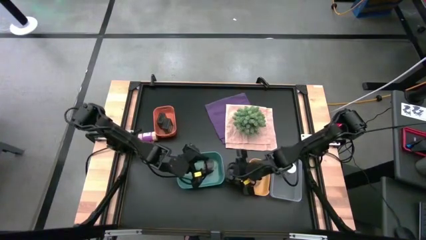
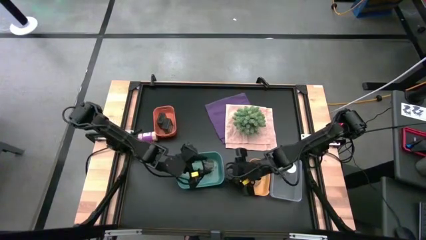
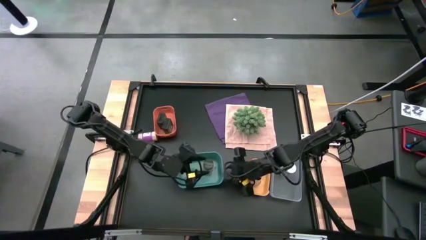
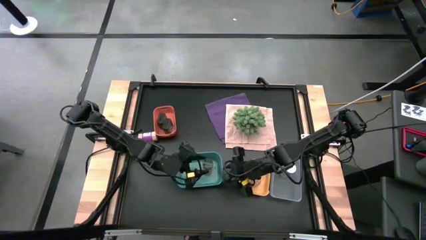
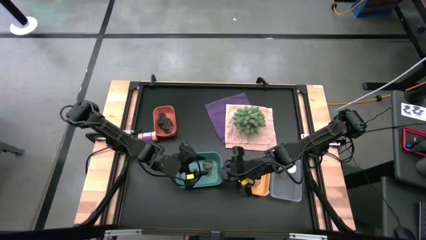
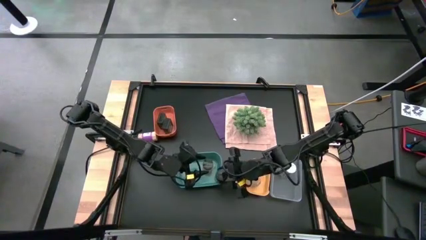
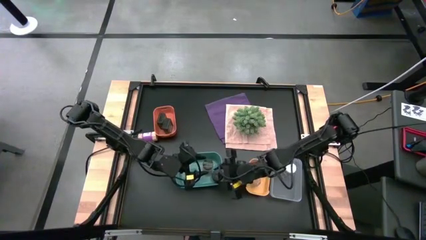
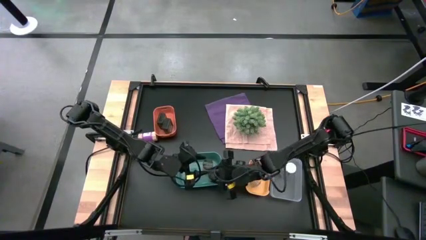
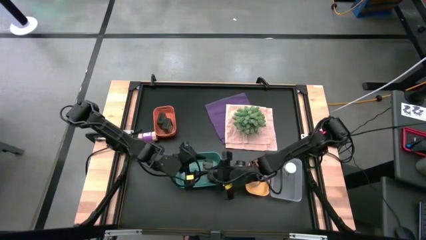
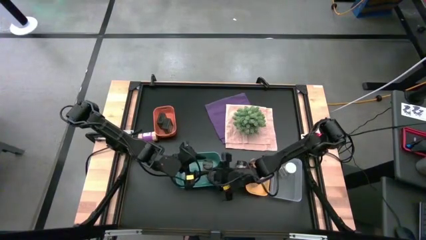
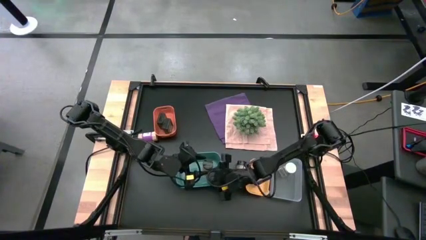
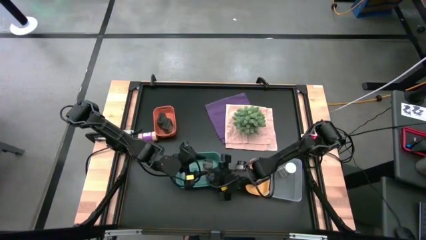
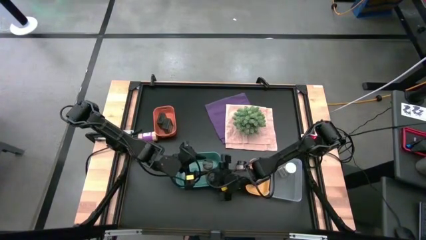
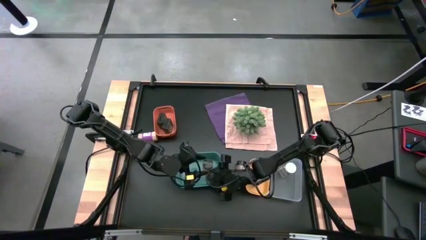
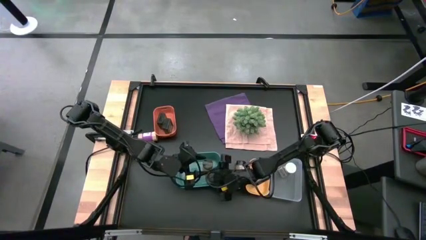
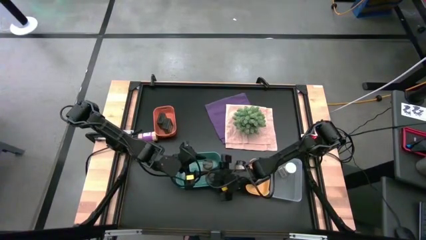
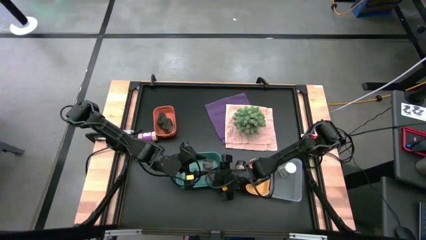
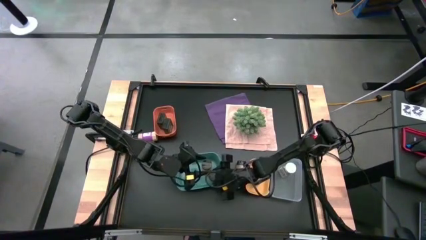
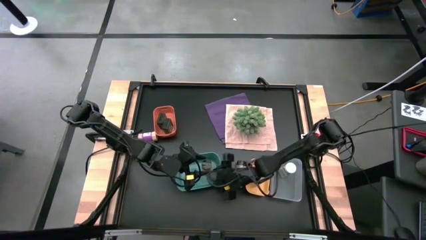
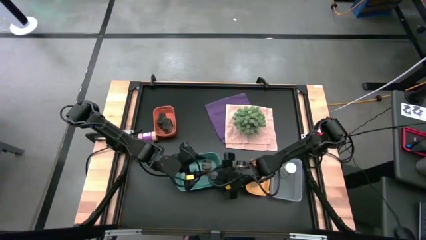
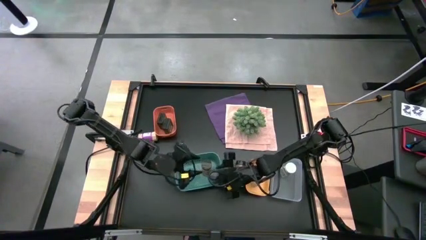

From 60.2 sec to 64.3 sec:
Task: Sort spices by type
Put the black seasoning bottle into the blue bin

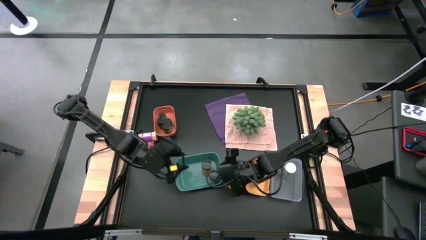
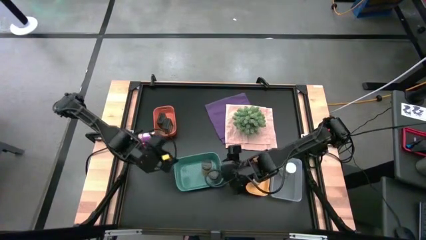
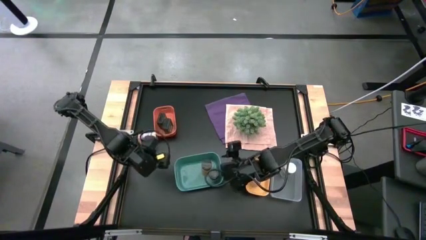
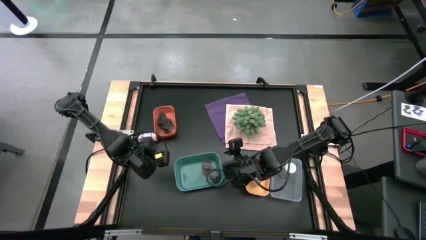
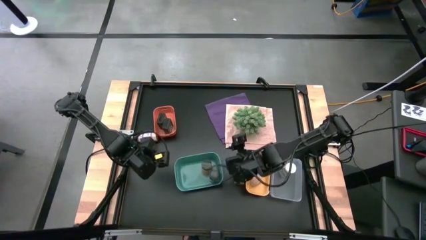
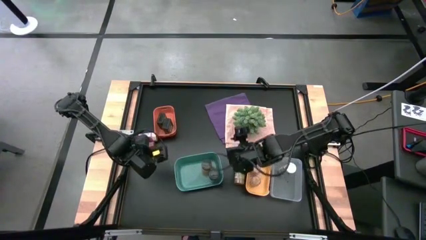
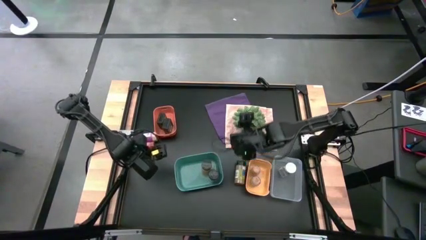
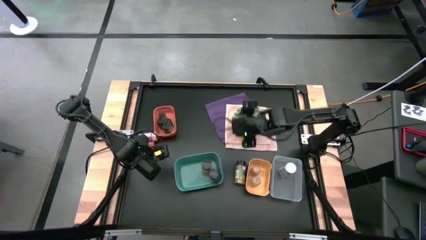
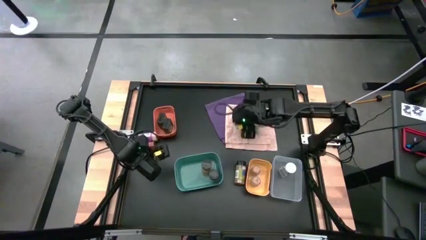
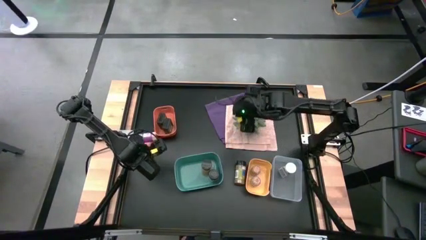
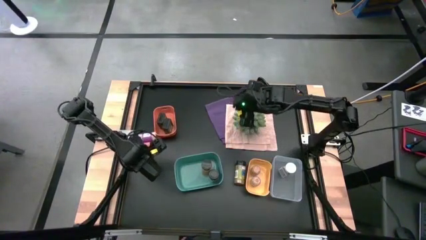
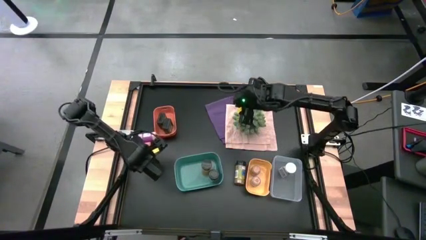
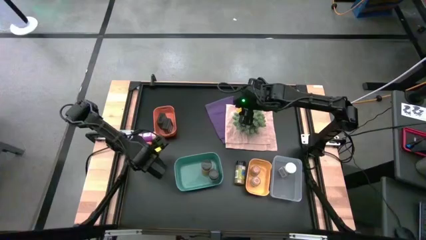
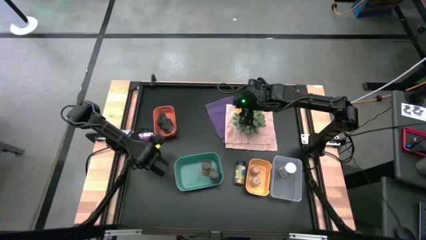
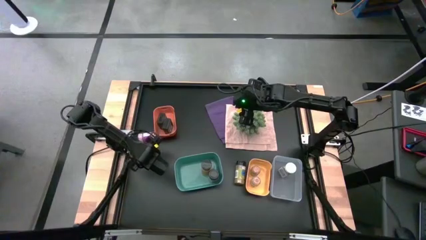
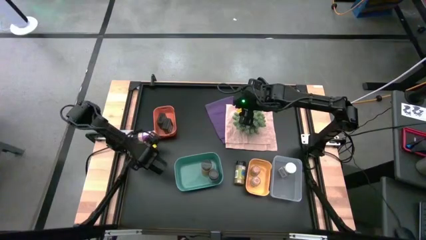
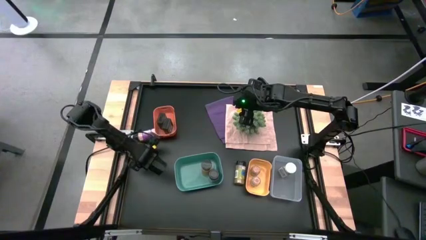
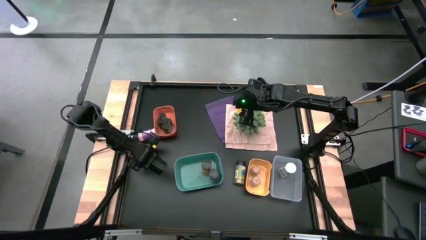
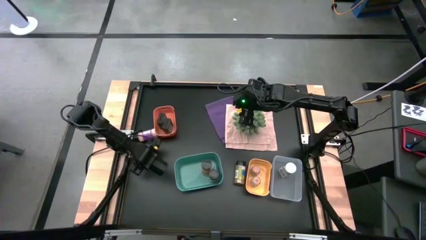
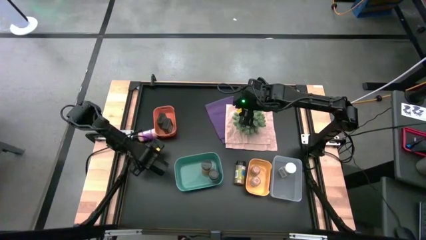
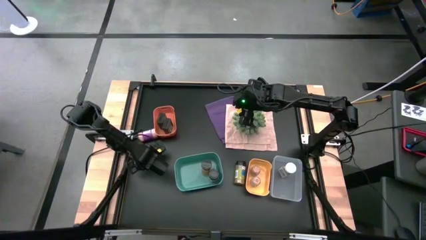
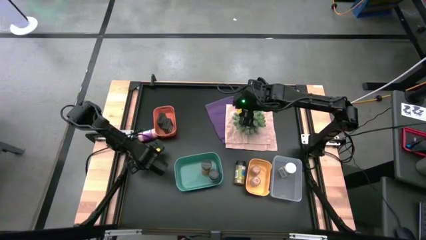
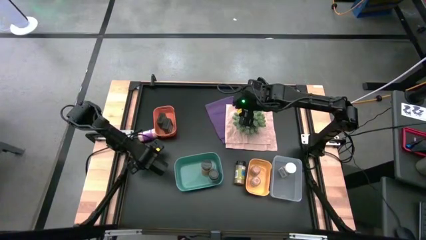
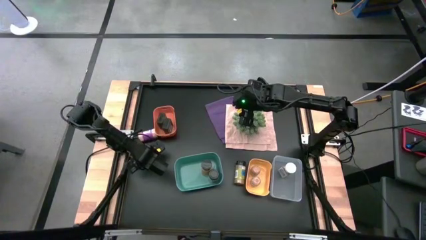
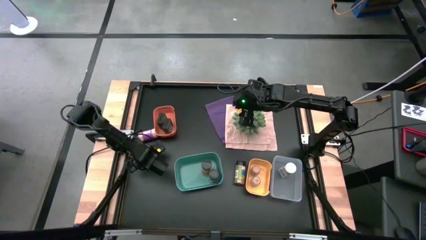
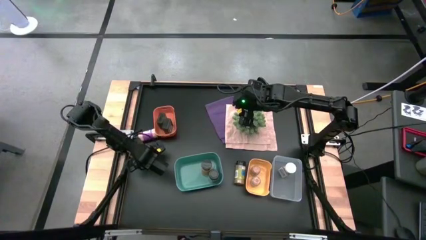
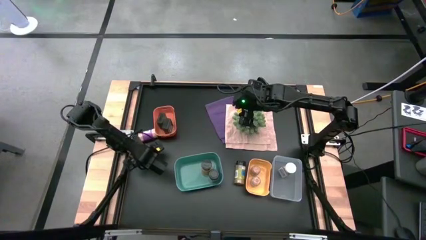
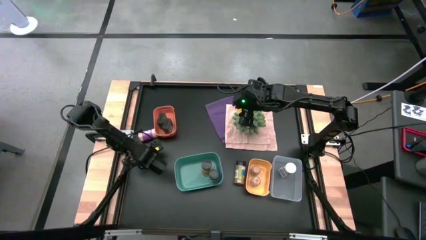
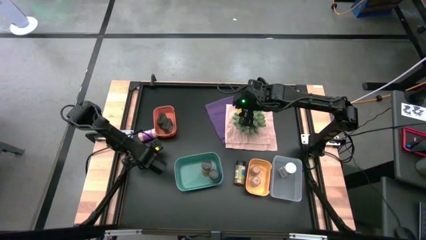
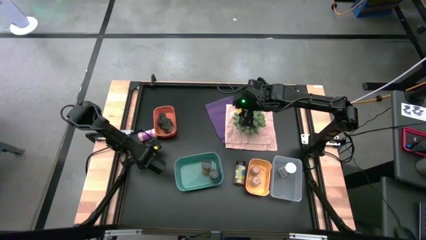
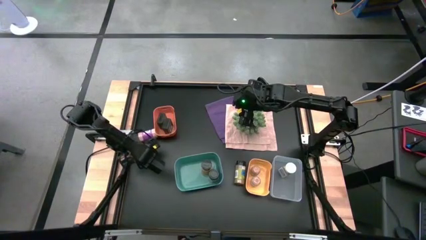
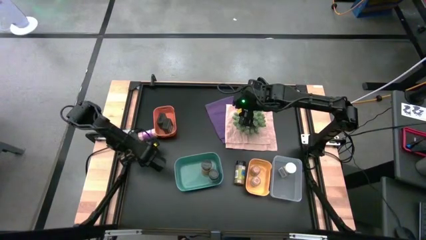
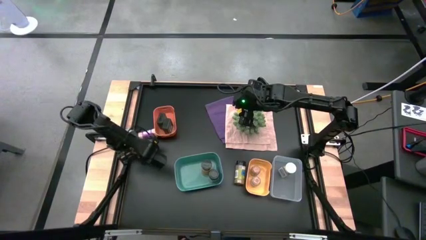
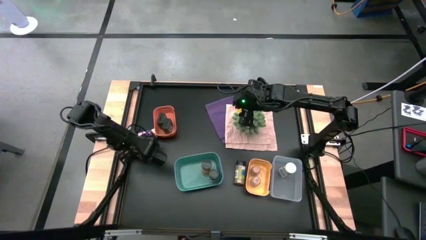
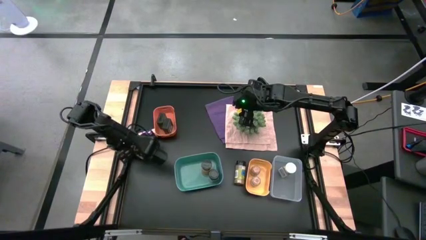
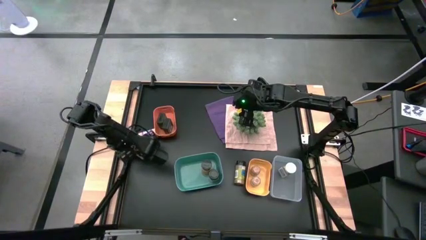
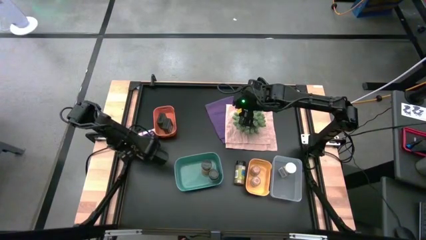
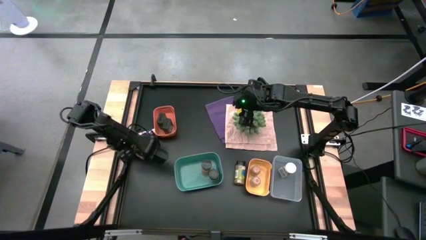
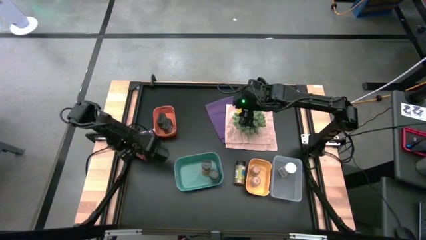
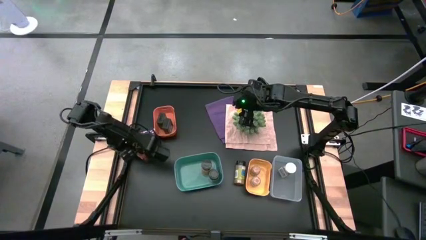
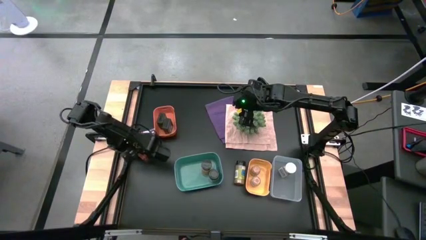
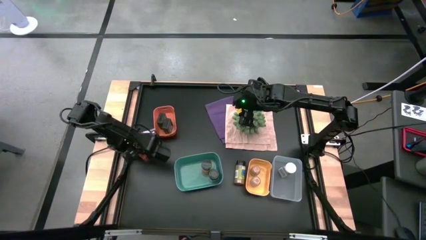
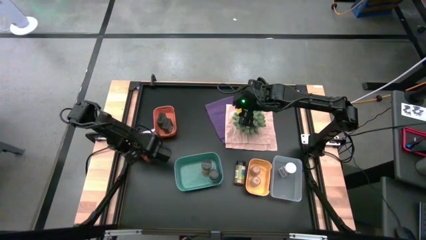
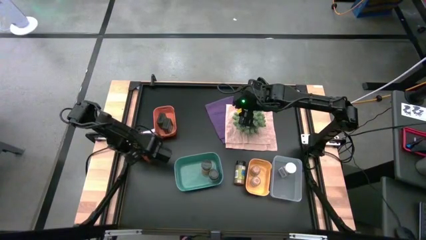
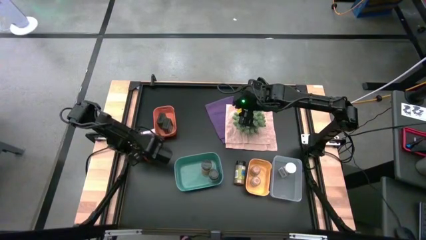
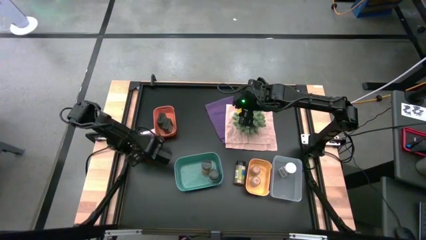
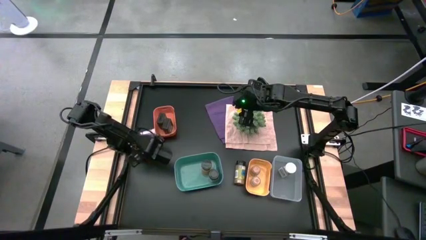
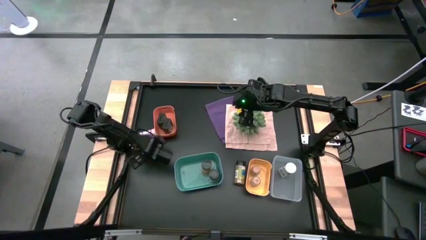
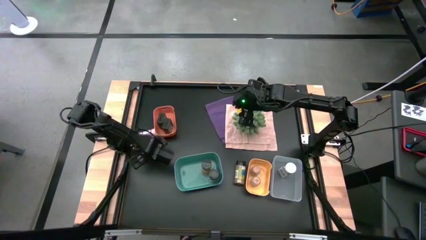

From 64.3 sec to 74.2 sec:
Put the orange seasoning bottle into the blue bin
